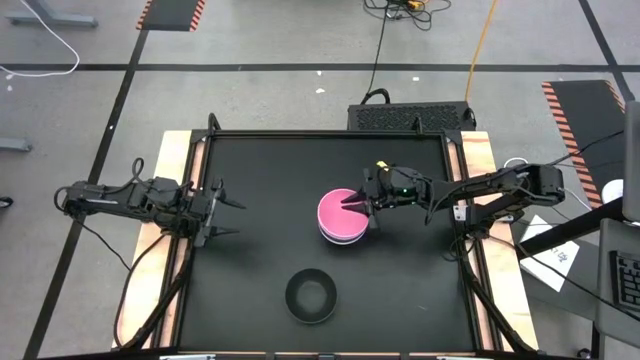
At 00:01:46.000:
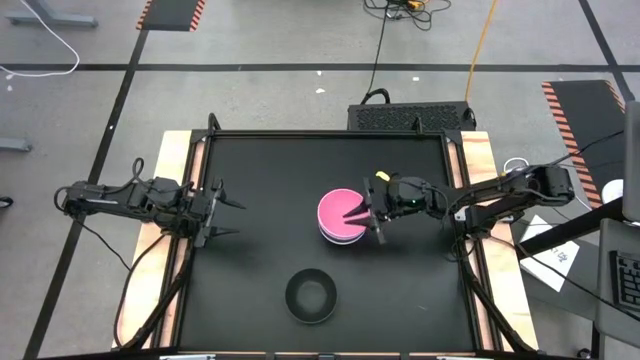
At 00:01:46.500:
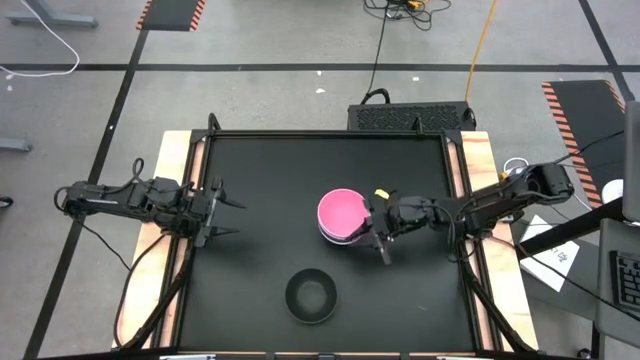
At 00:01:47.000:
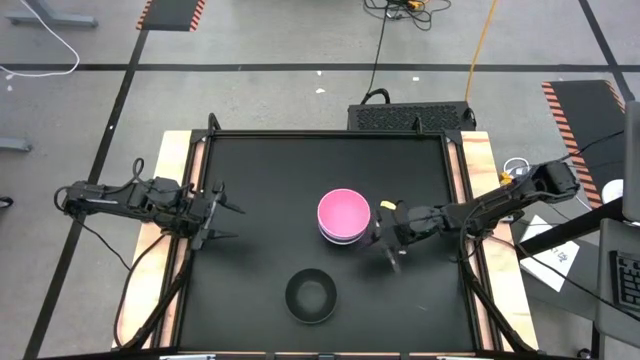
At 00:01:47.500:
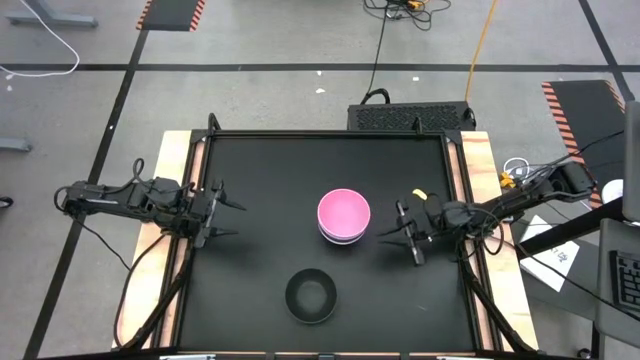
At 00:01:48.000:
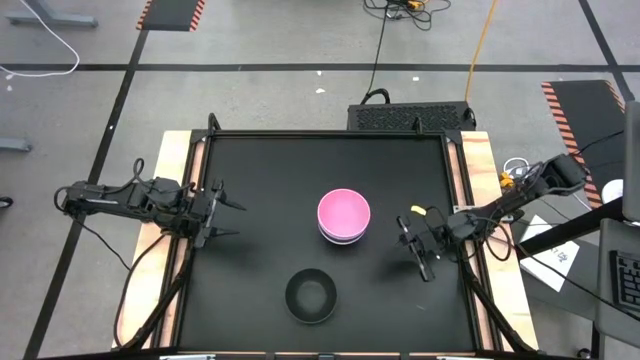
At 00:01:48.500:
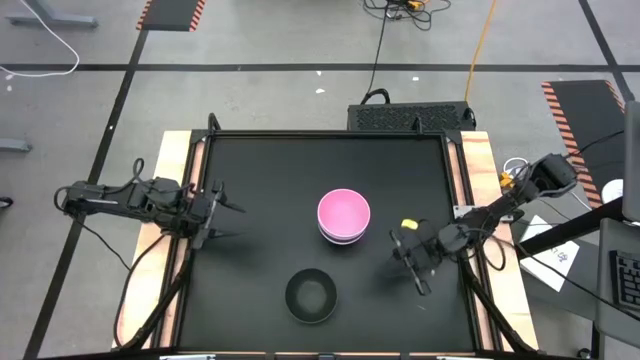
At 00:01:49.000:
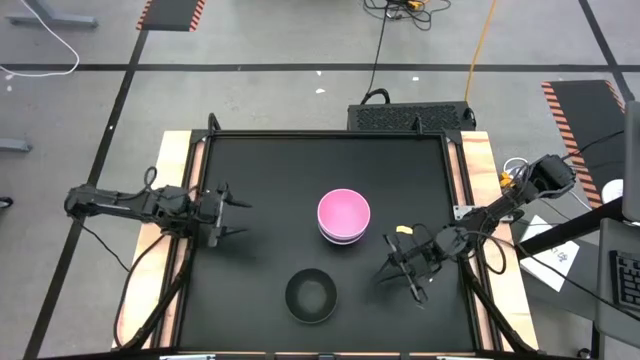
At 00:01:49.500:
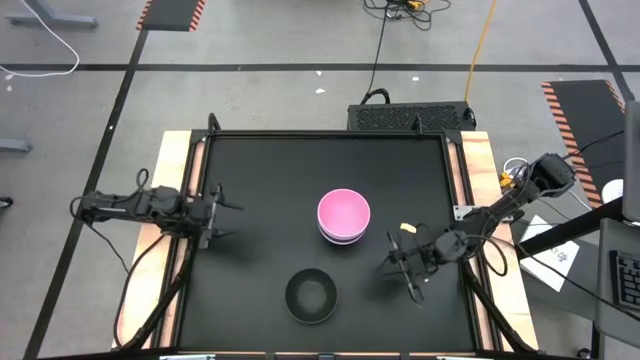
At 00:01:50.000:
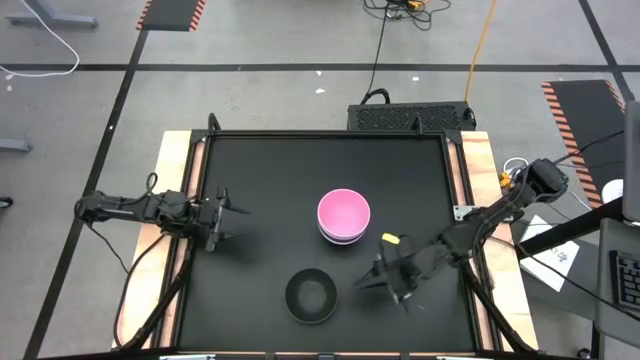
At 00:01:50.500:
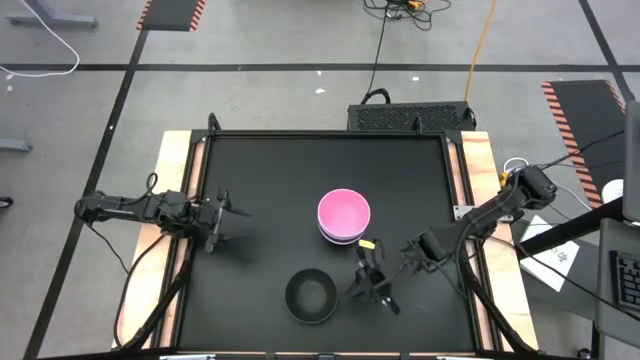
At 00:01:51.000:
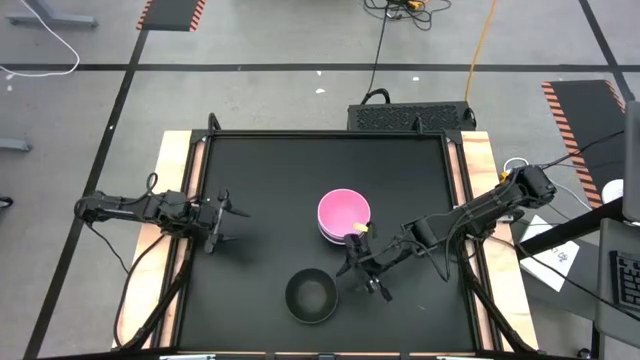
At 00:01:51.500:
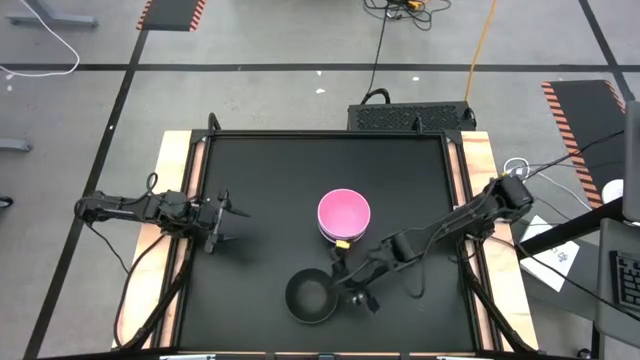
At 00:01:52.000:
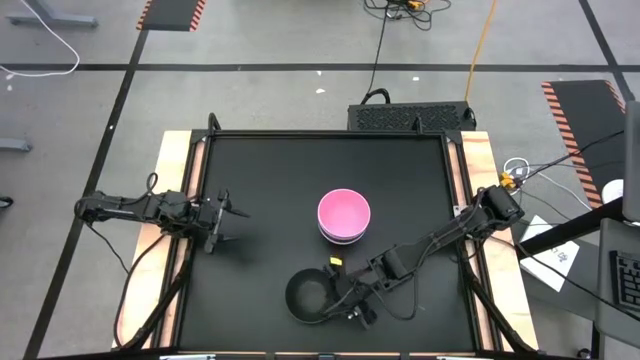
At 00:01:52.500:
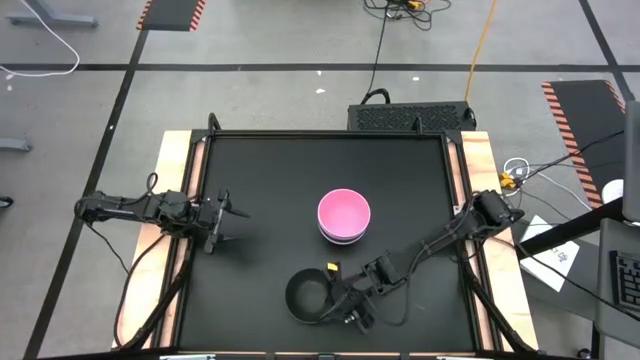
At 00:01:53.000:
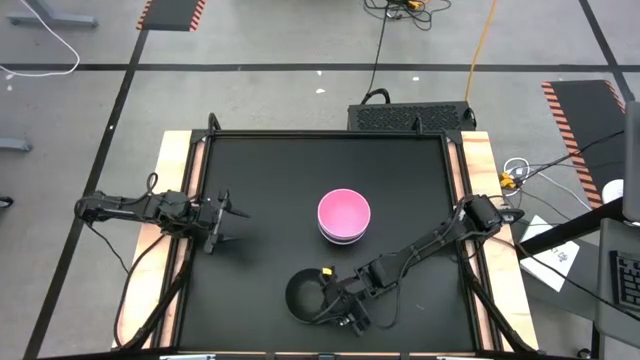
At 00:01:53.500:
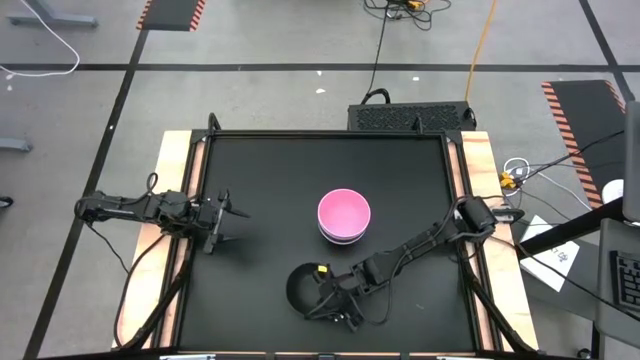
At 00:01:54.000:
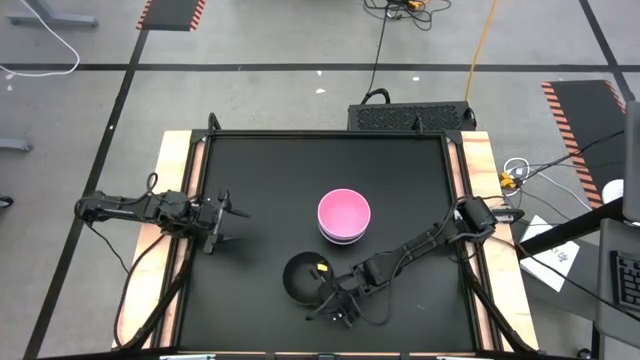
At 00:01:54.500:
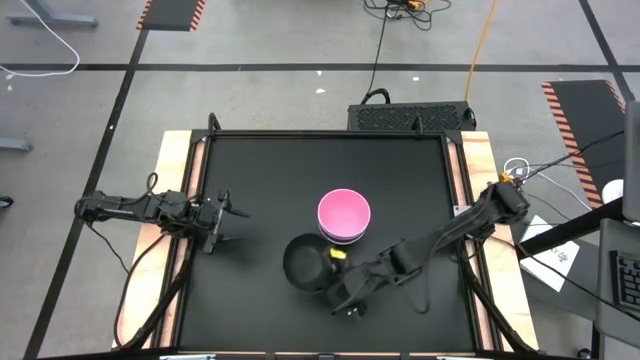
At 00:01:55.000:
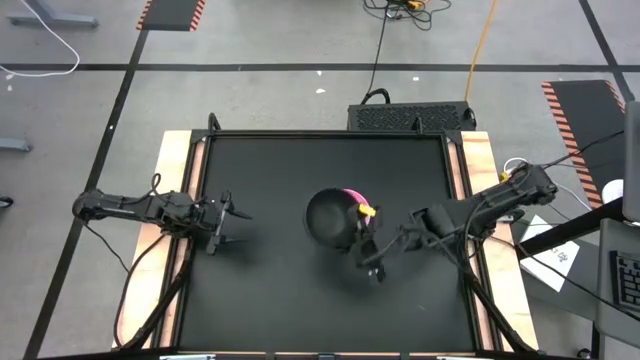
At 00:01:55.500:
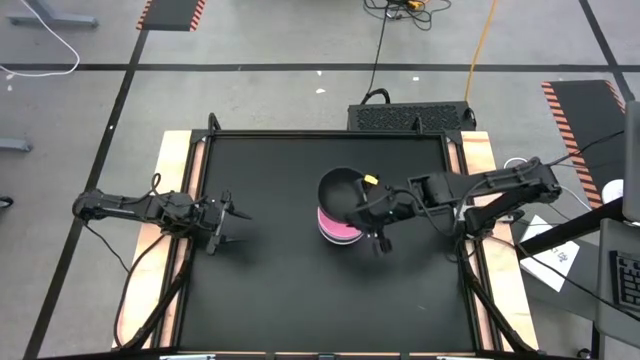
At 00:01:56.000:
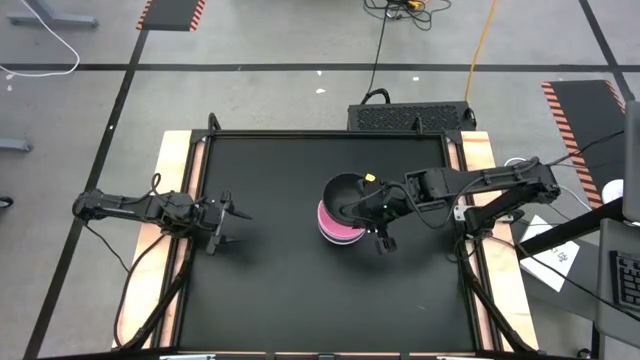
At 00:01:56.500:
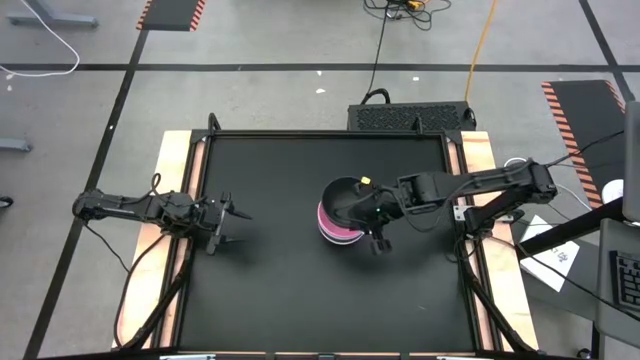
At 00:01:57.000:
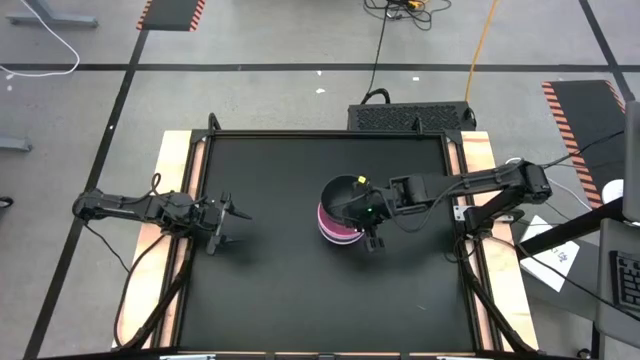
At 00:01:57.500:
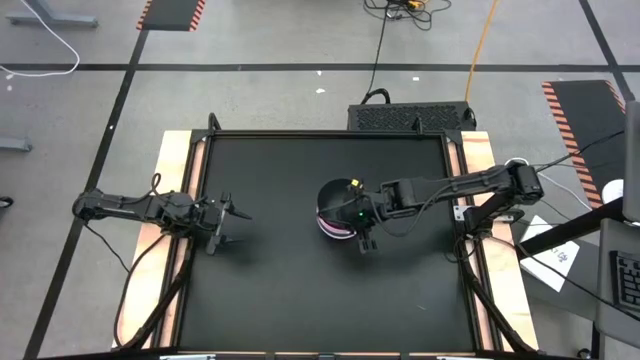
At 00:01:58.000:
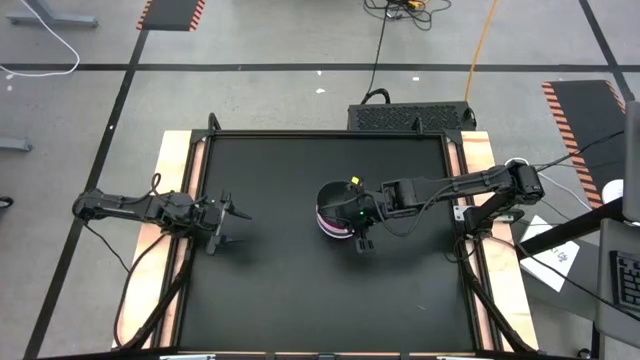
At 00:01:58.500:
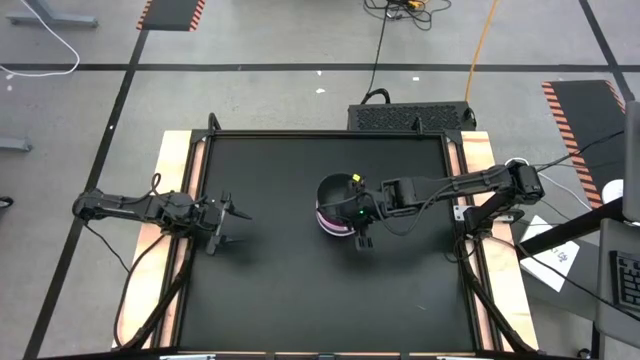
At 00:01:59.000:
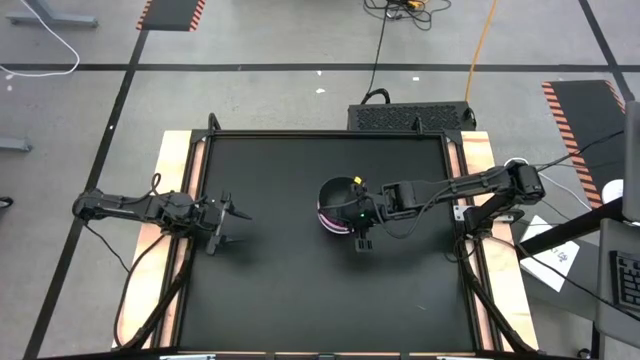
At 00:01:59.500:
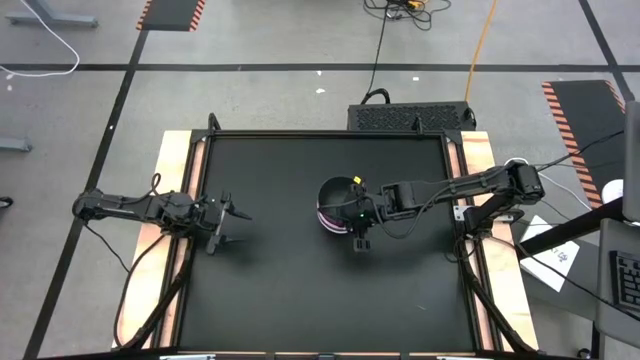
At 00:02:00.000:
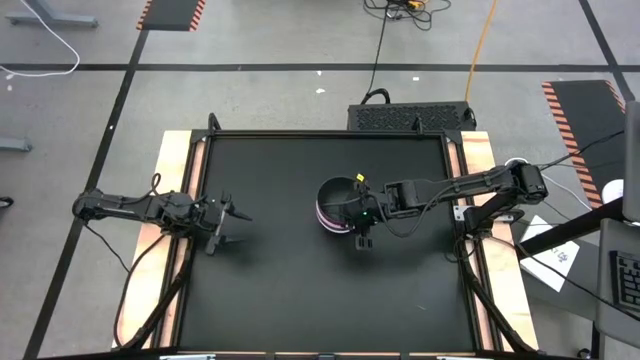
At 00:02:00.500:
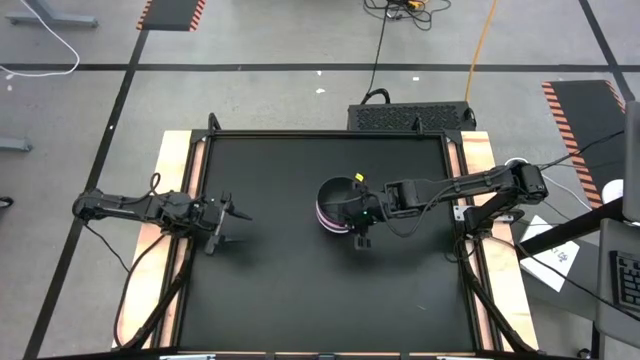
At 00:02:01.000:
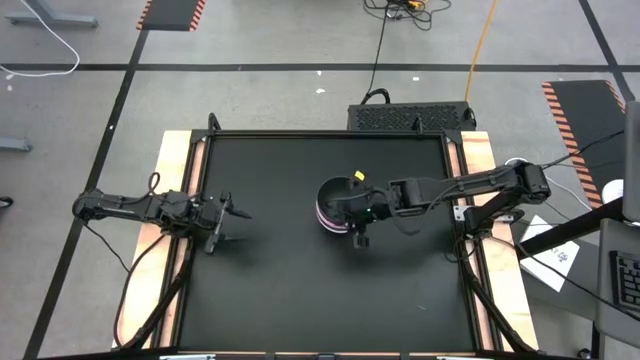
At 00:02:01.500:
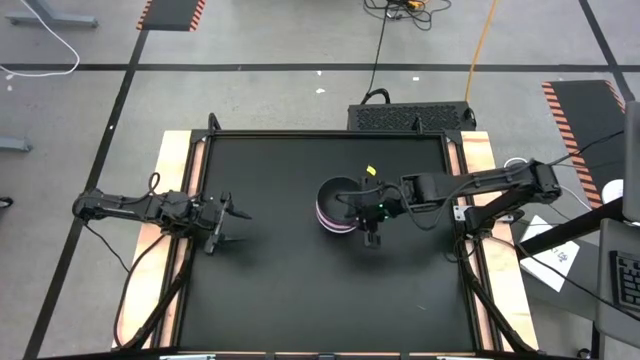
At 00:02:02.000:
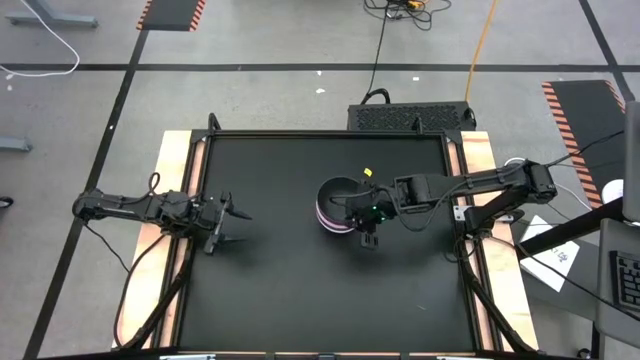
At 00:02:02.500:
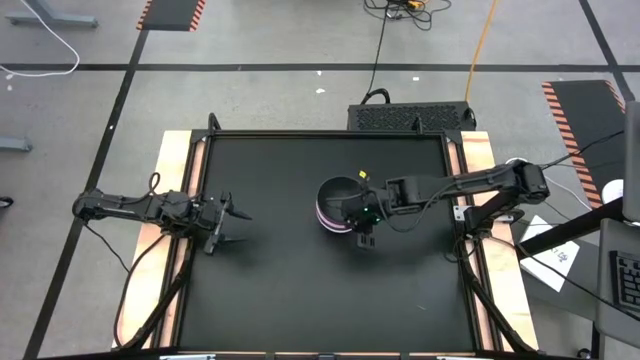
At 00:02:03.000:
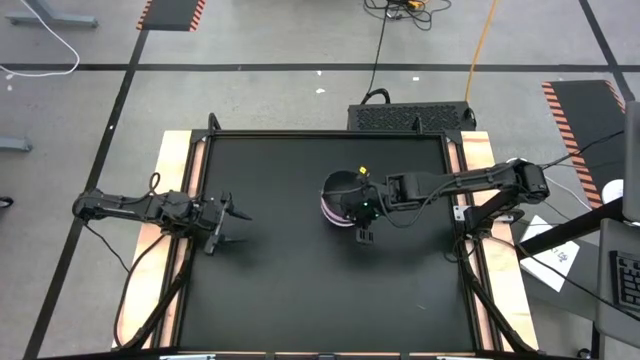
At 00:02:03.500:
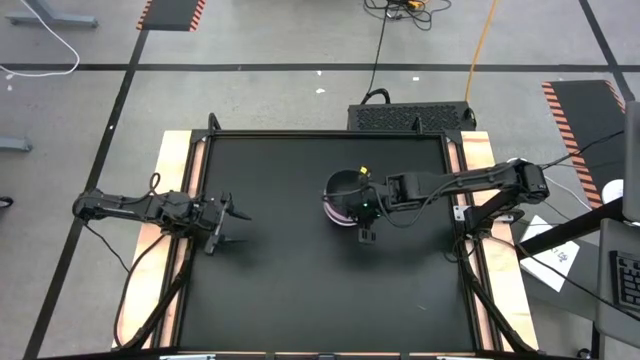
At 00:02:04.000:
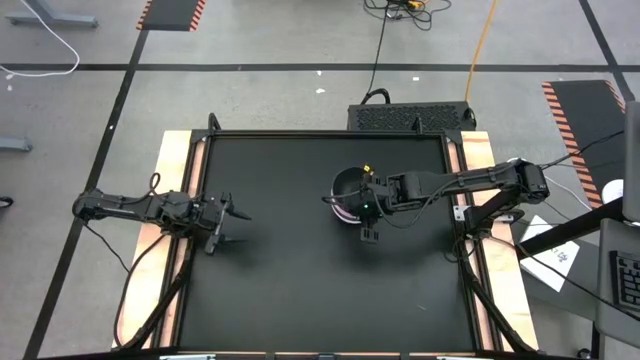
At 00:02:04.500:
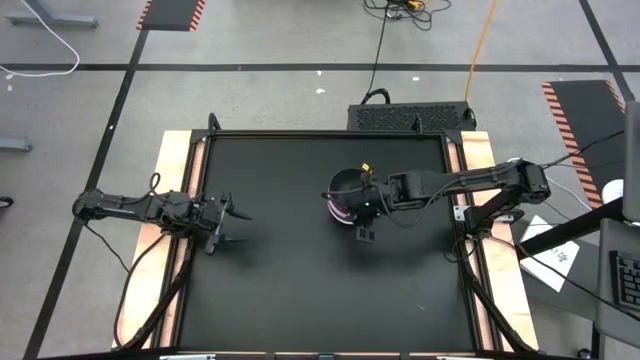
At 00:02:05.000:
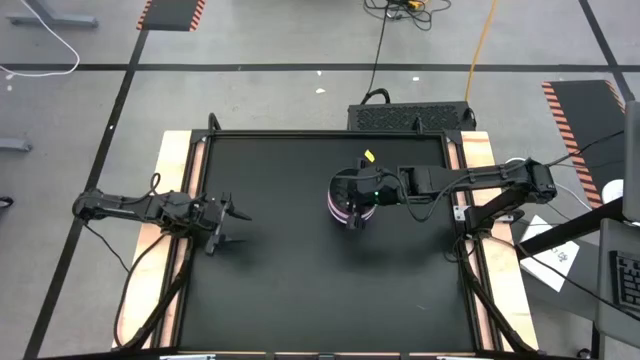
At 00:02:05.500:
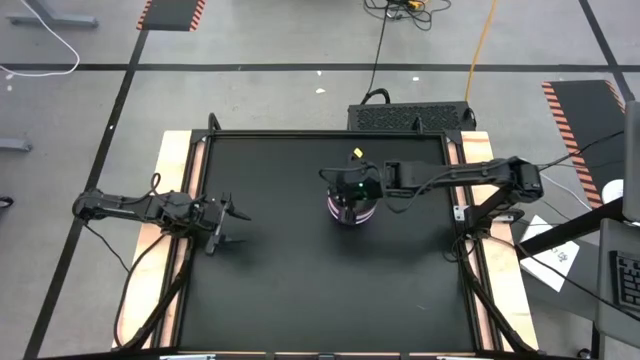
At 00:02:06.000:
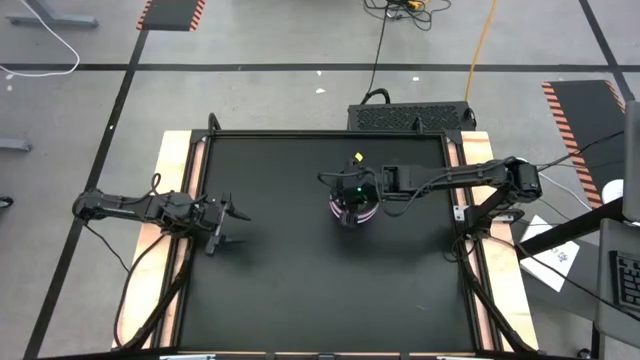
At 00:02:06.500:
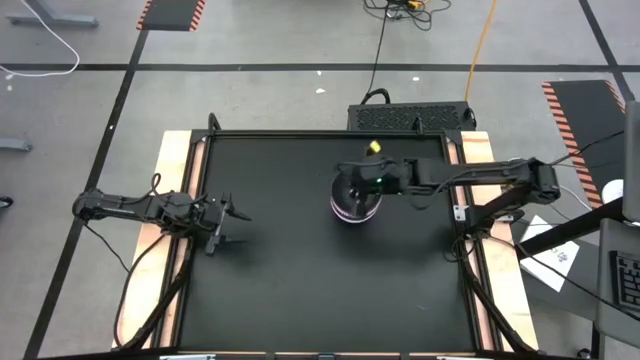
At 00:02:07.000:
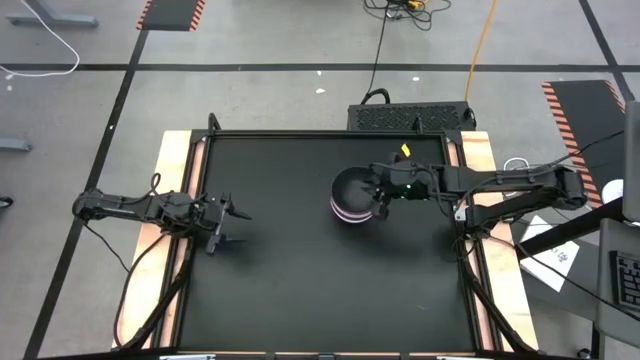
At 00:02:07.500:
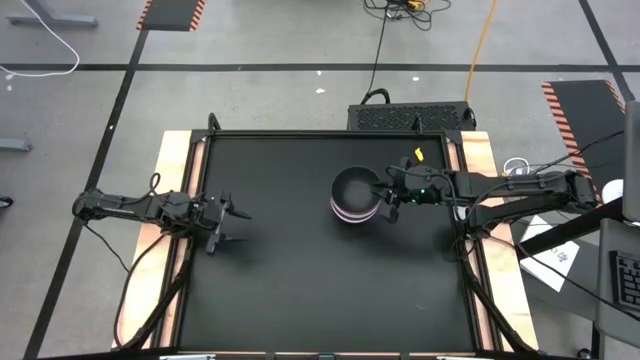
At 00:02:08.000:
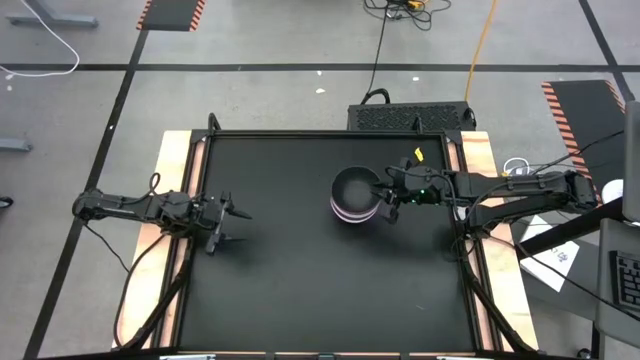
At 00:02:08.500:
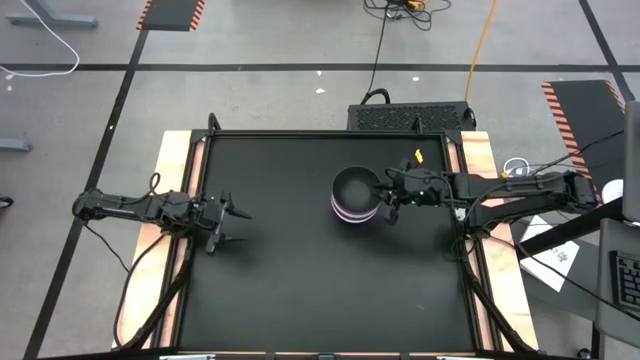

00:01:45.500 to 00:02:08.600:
Task: Nest bowls inside each other
Stack the black bowl on top of the pink bowl
